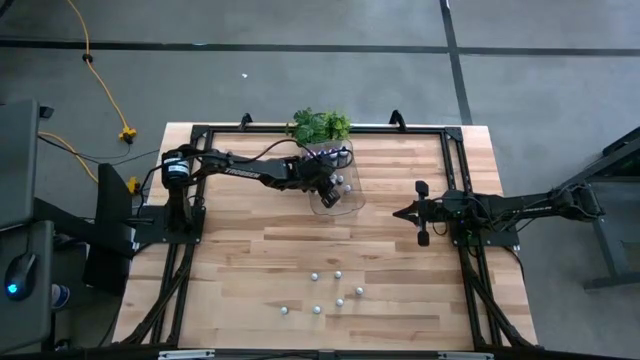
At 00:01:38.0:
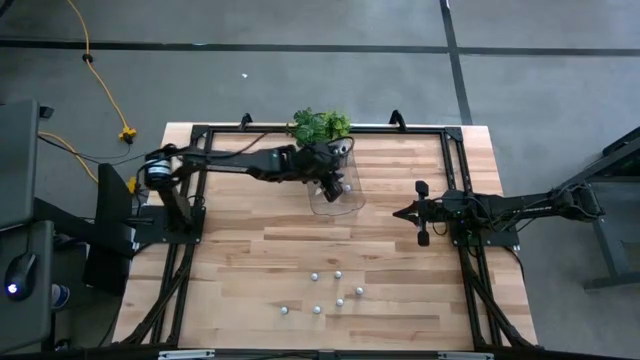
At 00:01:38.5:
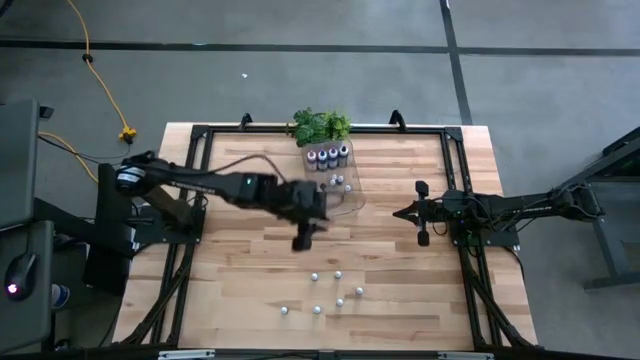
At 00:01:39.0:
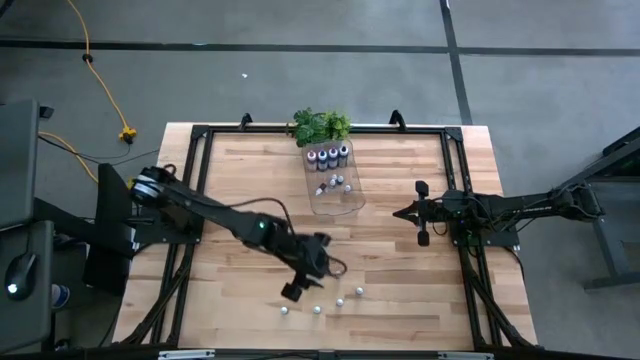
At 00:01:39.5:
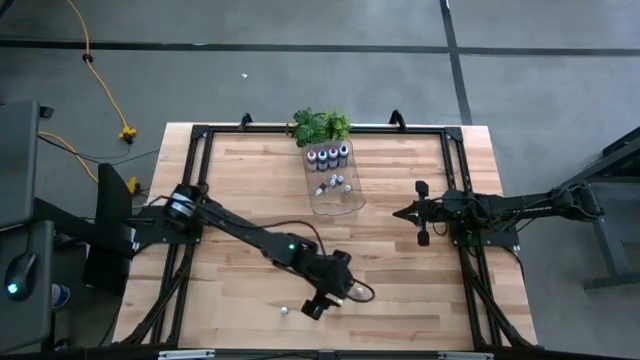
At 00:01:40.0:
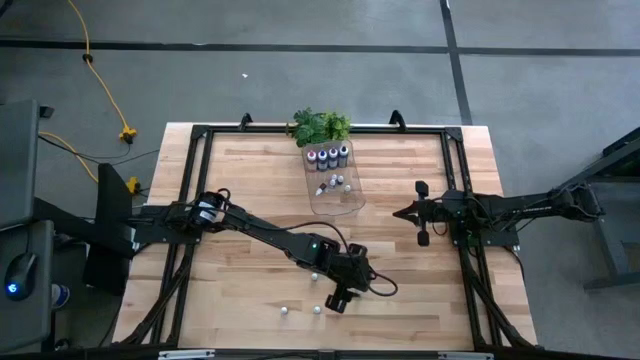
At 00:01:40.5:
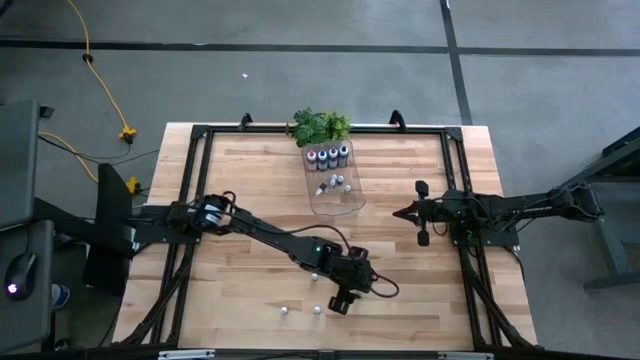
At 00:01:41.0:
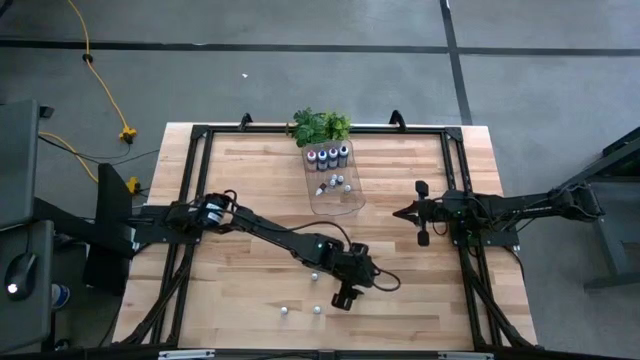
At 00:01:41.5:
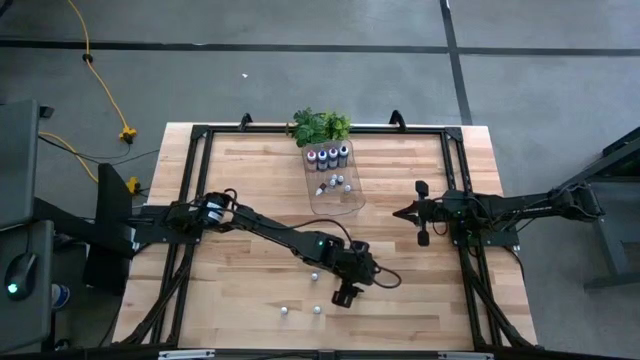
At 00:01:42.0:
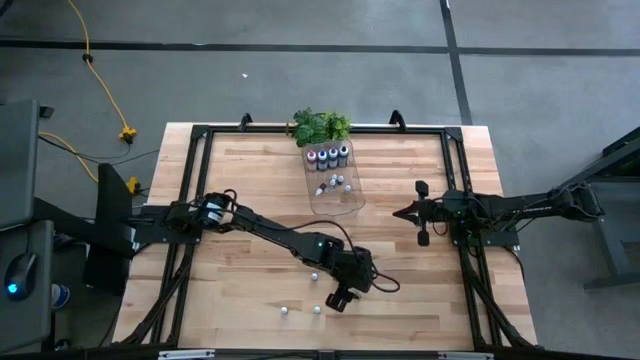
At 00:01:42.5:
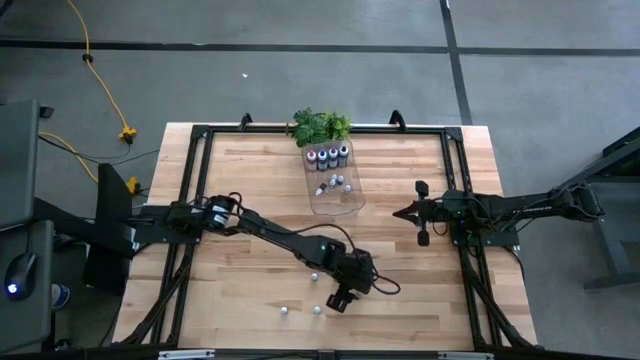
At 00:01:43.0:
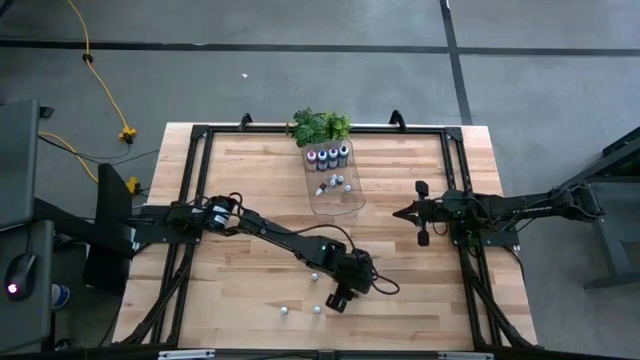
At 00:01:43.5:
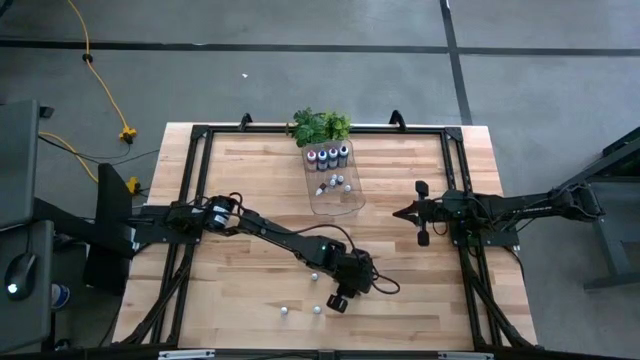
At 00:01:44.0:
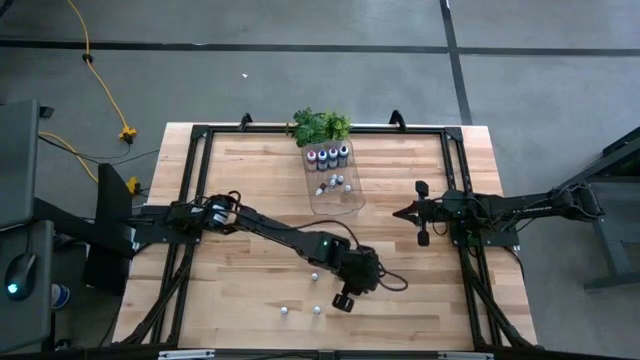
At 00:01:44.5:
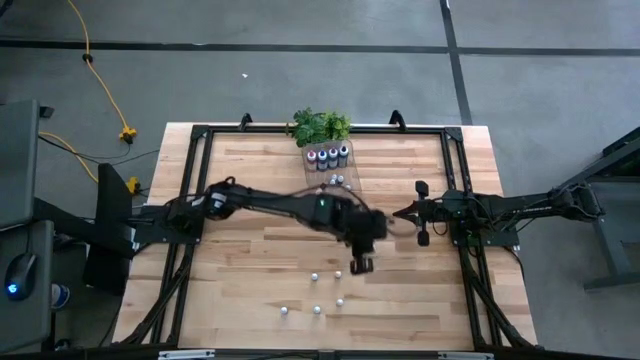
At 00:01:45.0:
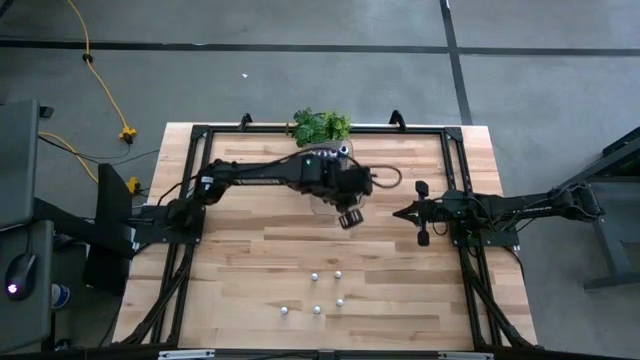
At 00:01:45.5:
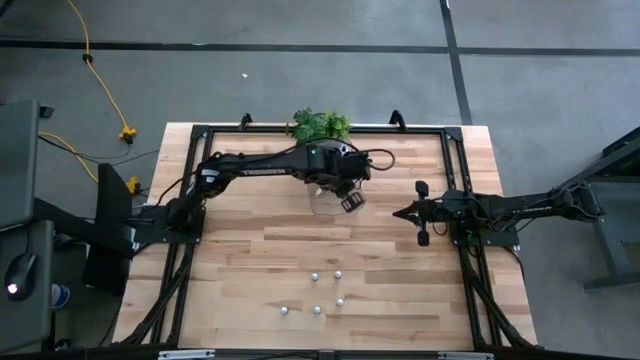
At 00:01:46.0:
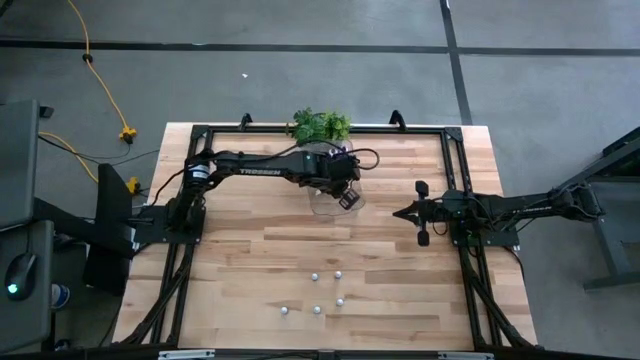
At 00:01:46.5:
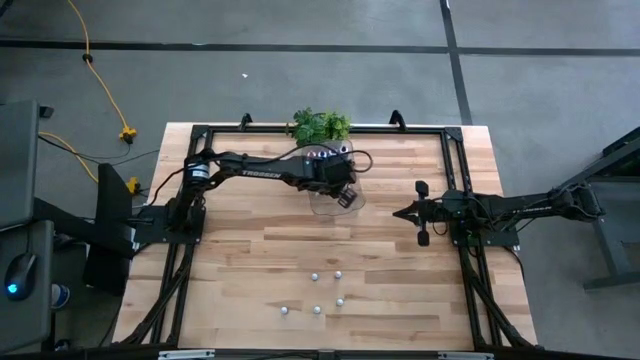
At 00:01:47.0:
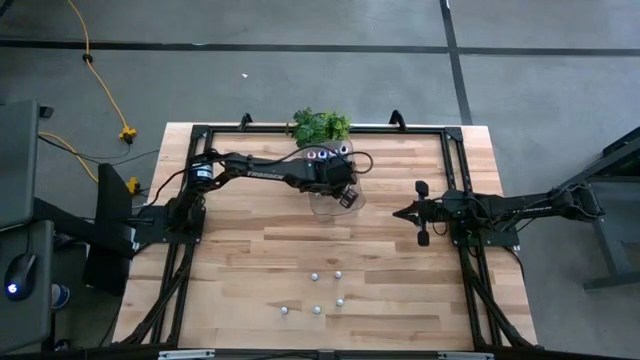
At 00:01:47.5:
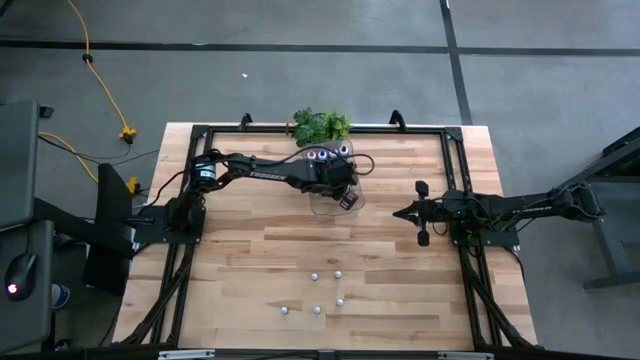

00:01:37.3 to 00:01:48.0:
Task: Pick & Place food coloring
Put the top small violet food coloring bottle into the transparent bin

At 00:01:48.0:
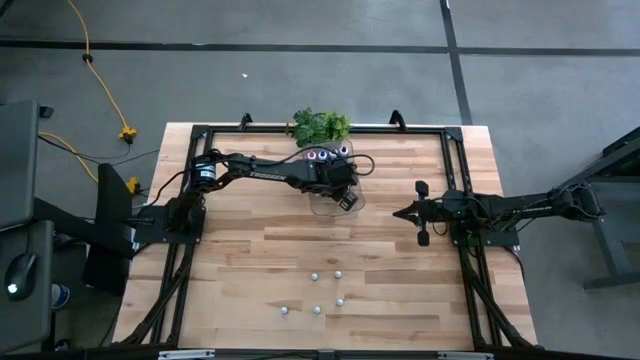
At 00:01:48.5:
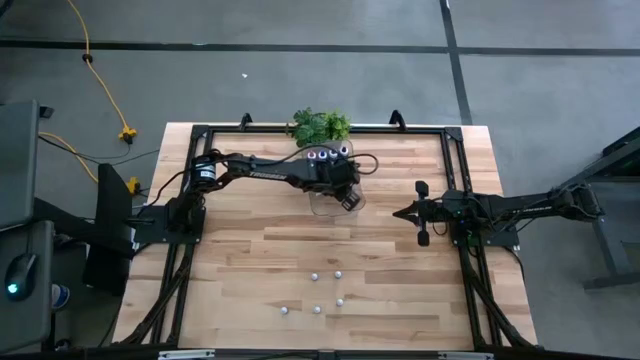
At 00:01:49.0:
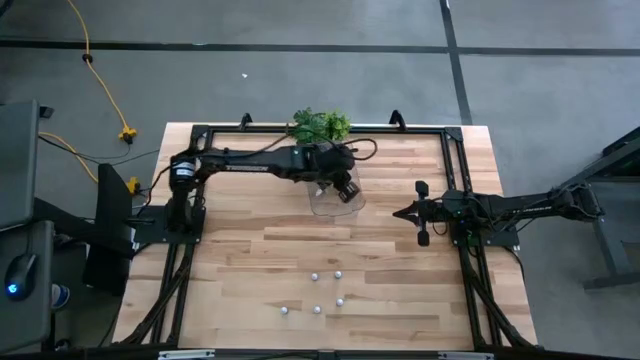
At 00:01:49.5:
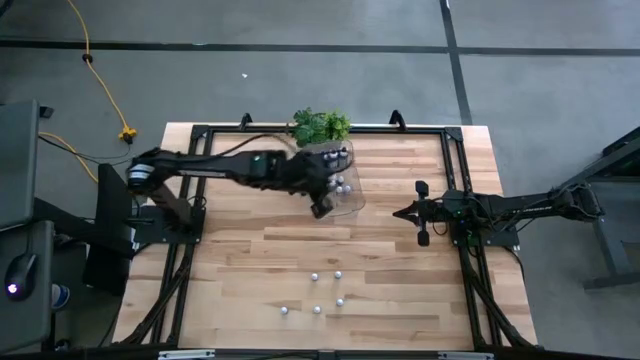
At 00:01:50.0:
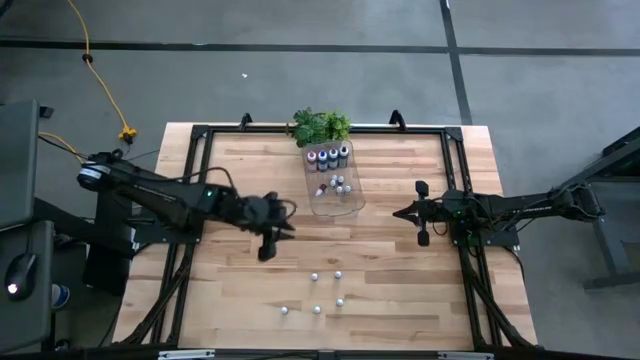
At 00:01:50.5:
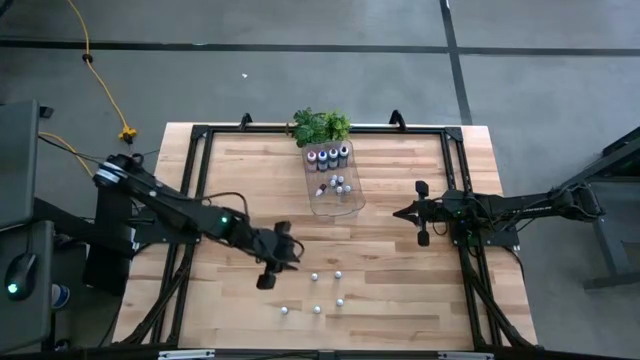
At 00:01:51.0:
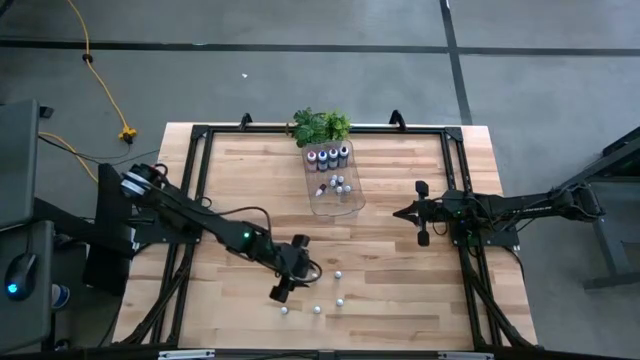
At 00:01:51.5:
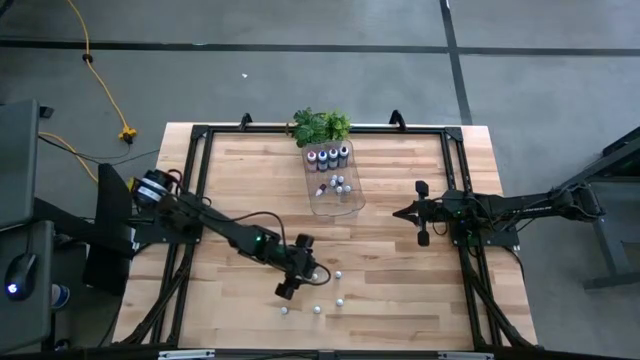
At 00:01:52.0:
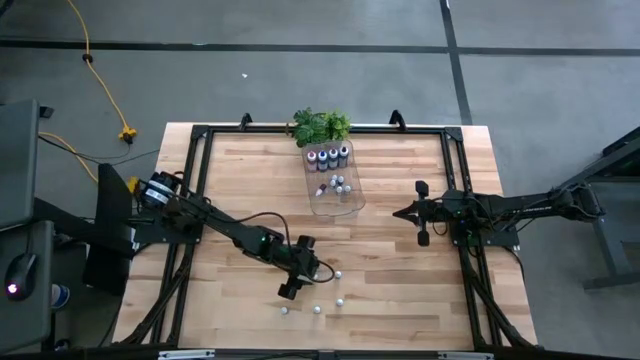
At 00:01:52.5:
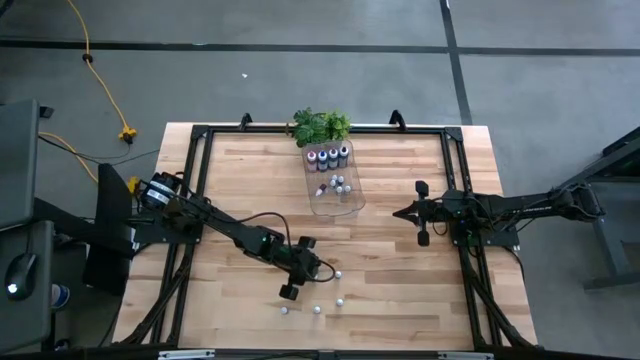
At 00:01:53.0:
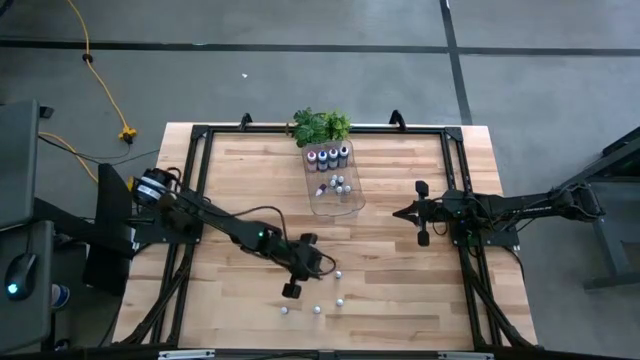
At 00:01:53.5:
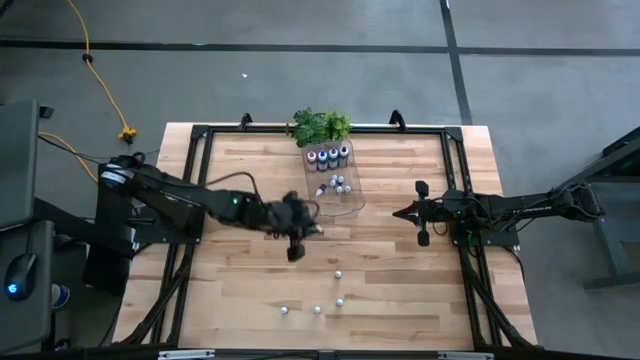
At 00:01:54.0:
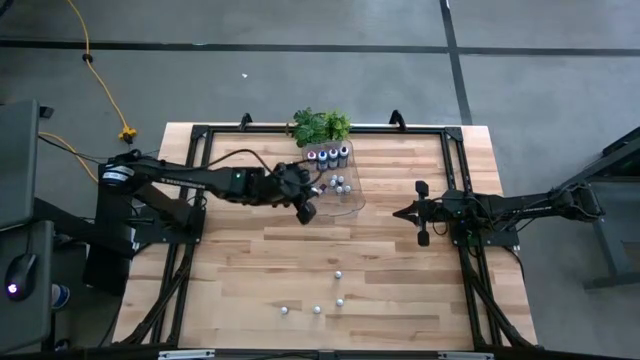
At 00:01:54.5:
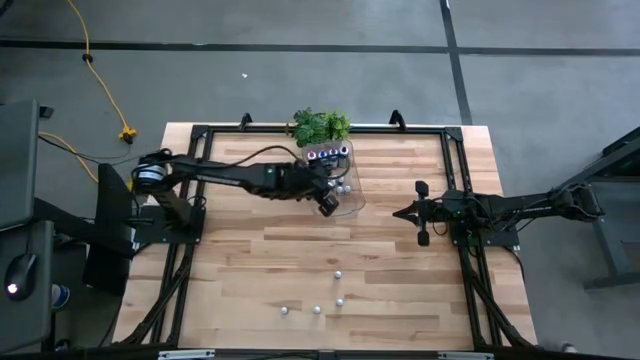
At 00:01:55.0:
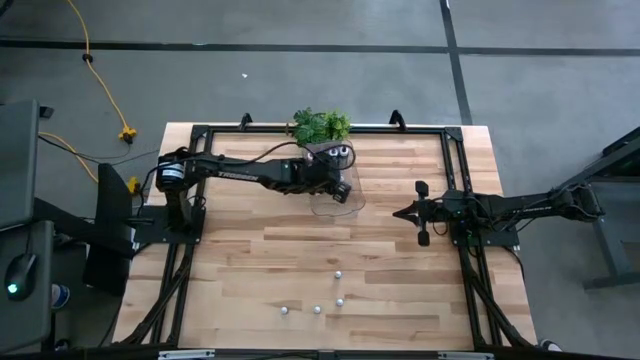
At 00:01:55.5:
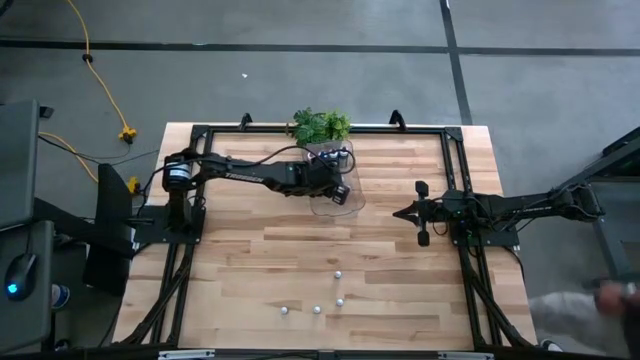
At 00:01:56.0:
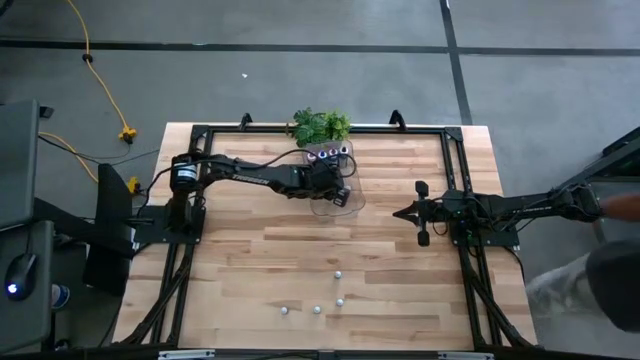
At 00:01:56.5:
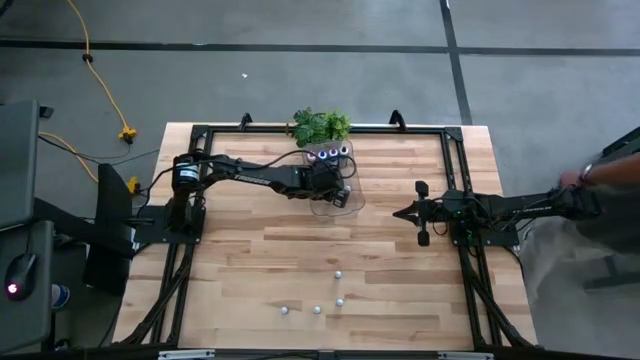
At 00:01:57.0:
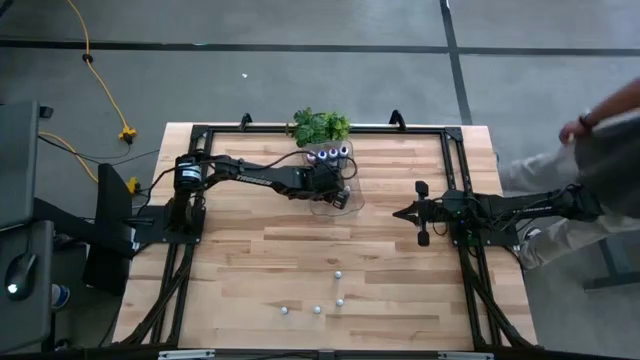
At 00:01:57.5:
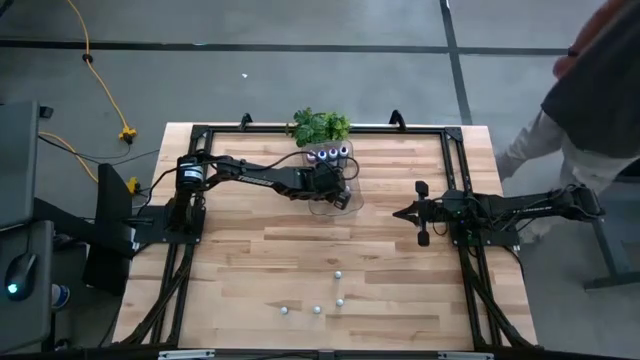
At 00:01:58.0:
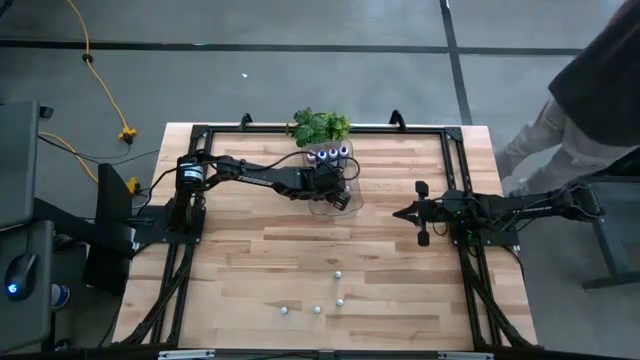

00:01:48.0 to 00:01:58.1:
Put the small red food coloring bottle into the transparent bin
